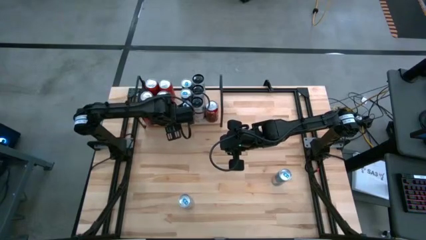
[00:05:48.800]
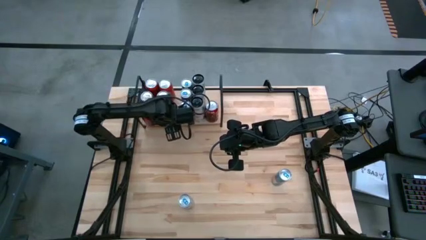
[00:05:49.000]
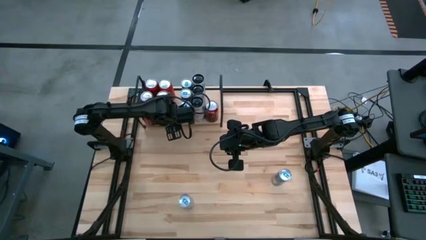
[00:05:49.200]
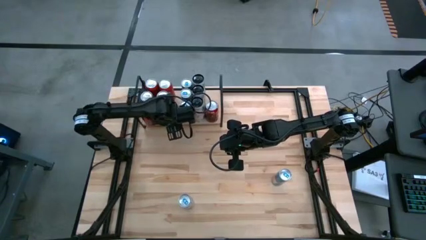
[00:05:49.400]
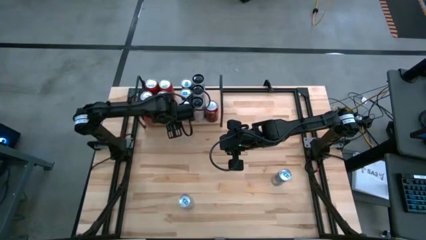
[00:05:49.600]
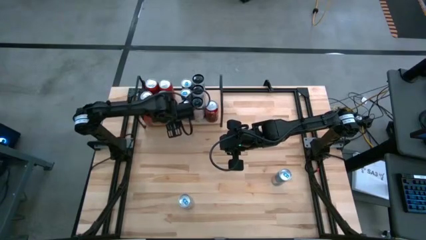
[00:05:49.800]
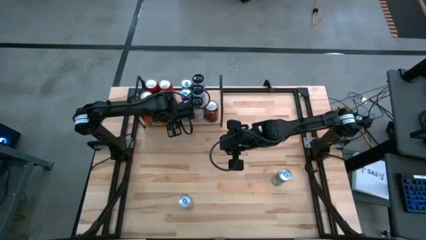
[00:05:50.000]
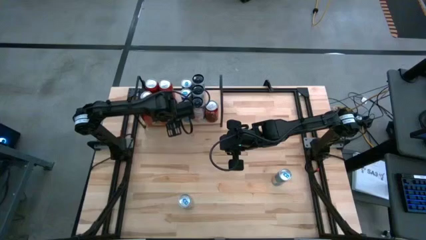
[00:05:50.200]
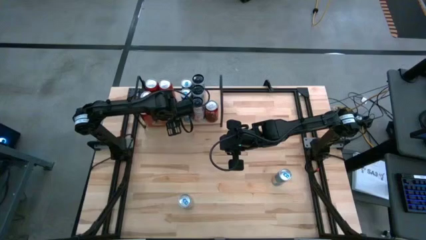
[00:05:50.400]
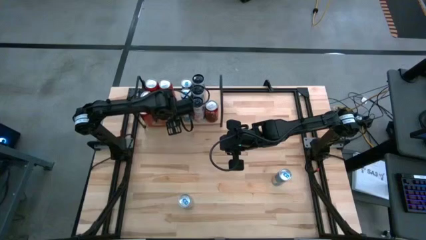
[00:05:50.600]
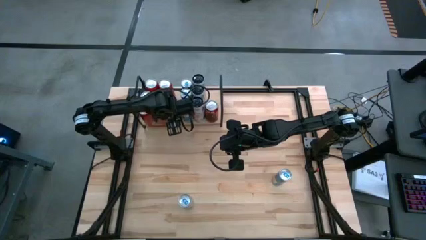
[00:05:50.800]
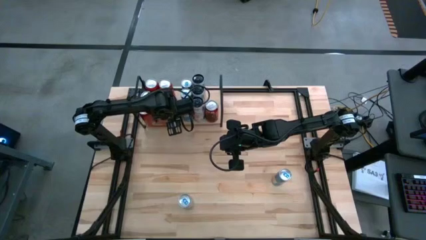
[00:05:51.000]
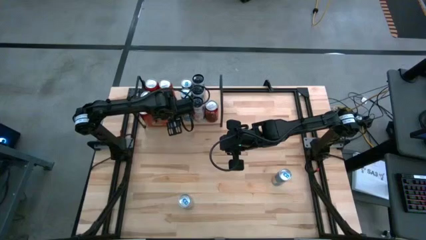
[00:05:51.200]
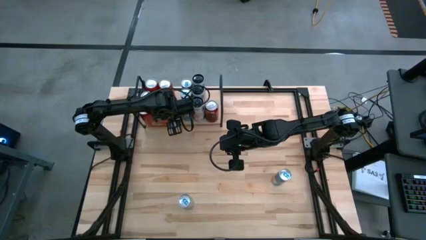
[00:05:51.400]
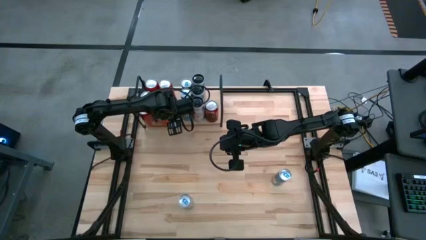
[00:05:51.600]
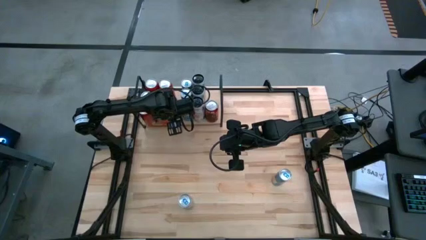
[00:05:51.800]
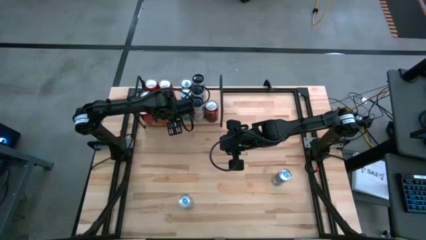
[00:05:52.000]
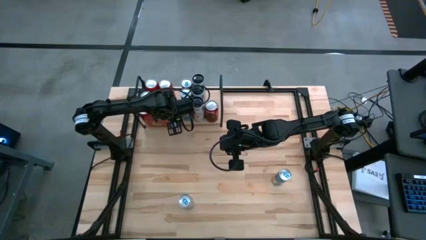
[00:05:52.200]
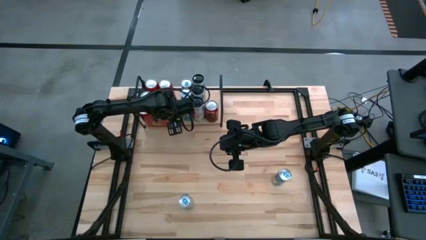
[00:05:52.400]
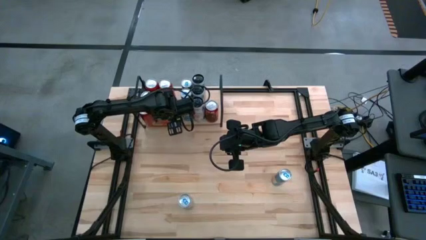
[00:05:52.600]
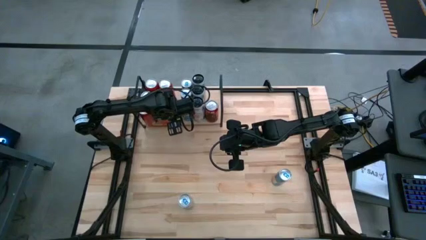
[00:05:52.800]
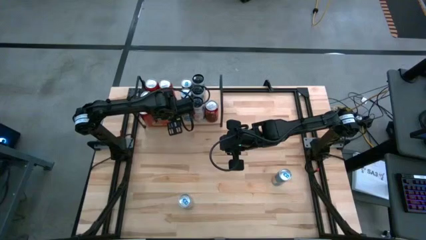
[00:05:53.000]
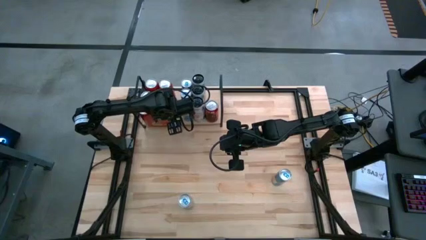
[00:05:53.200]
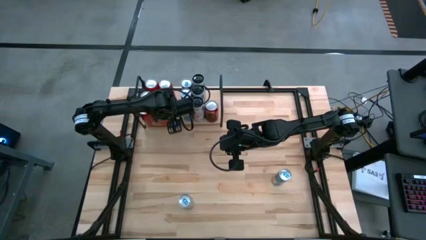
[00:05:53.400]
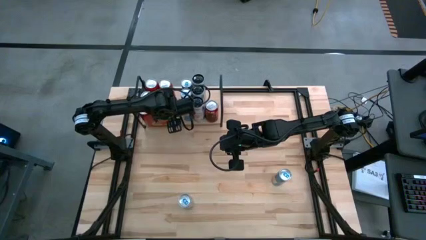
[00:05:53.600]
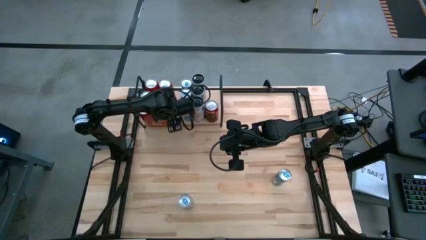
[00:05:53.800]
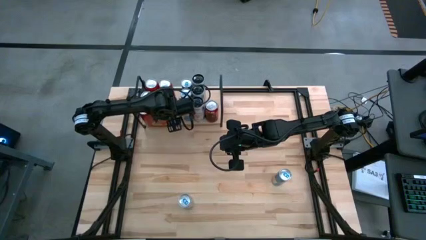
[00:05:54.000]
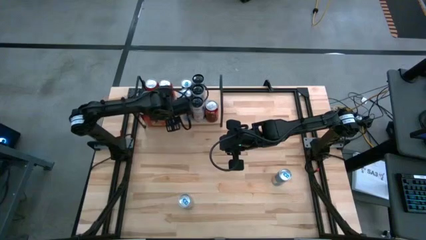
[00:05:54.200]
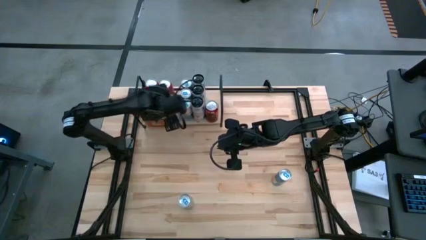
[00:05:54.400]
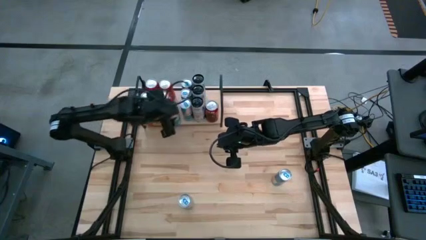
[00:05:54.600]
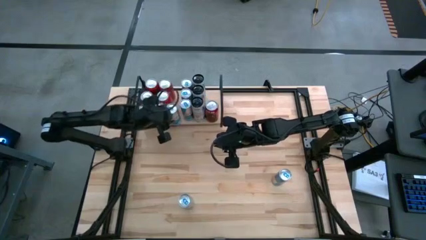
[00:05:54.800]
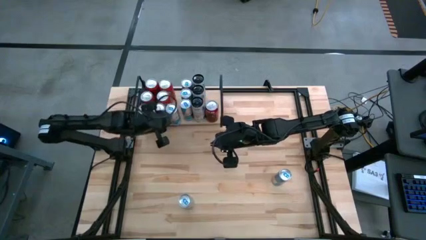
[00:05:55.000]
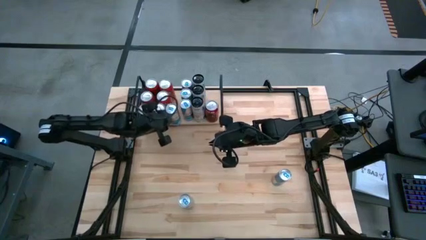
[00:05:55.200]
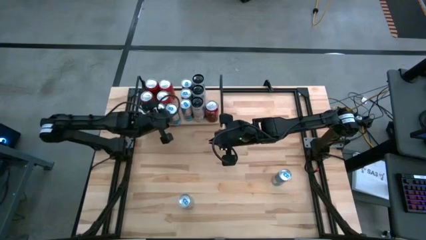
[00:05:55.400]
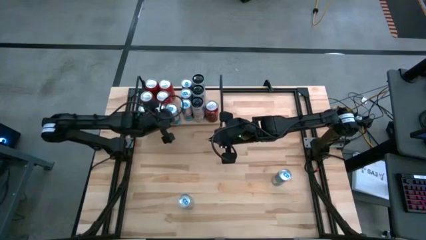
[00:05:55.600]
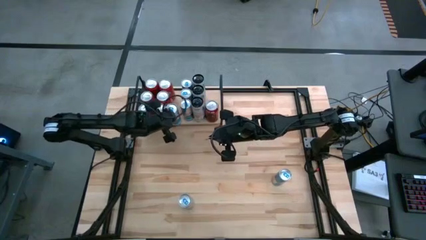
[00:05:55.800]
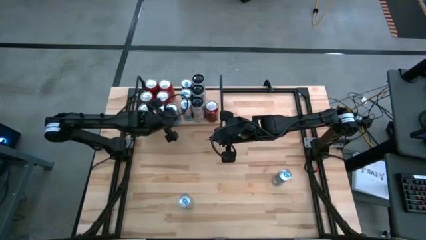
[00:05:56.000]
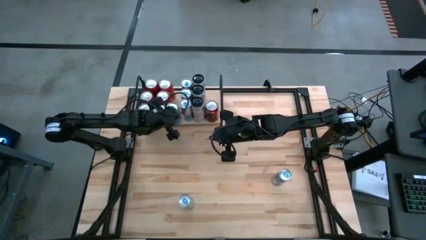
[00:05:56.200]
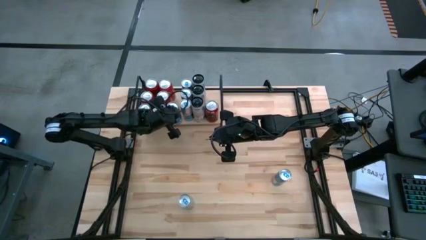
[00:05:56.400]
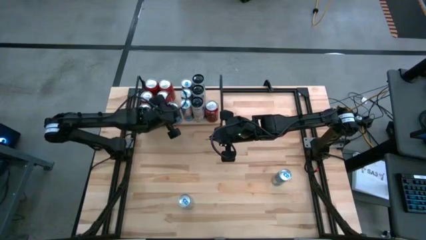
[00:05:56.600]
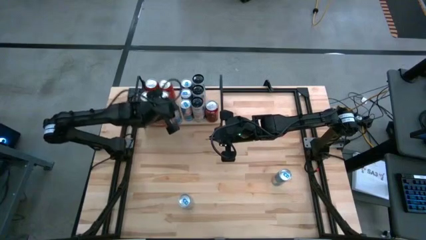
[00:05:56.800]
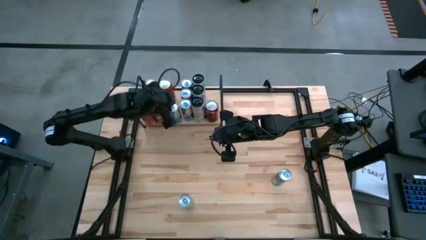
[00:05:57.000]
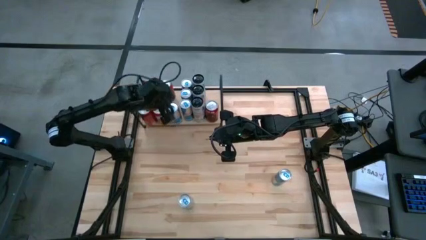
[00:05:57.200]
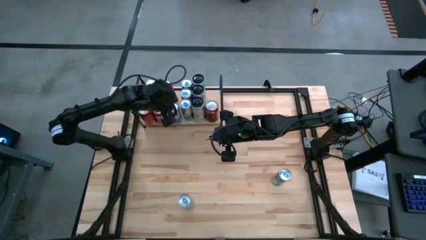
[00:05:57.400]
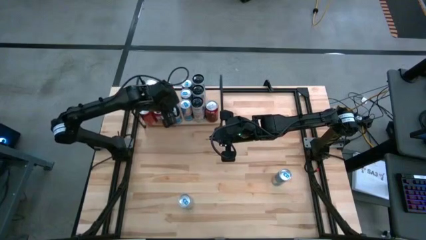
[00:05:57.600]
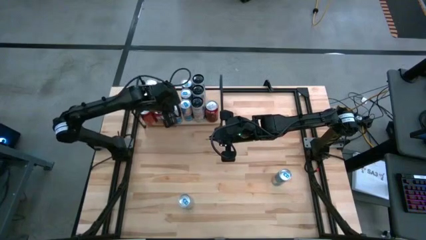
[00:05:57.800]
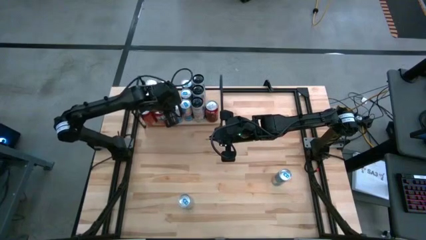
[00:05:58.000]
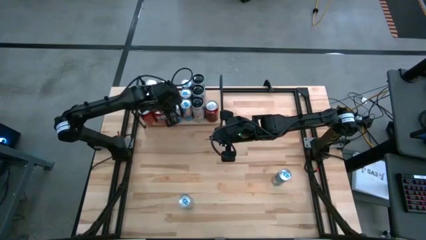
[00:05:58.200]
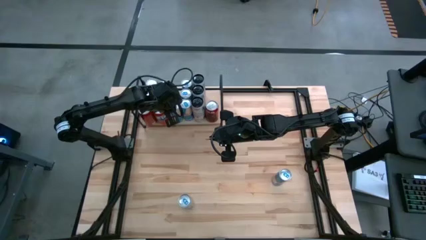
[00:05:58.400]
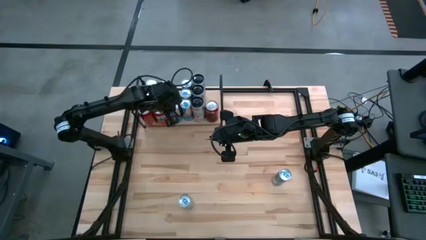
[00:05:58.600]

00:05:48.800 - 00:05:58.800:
Task: Place canned beverage on shelf
Put the blue soda can on the shelf beside the other aligned blue soda cans

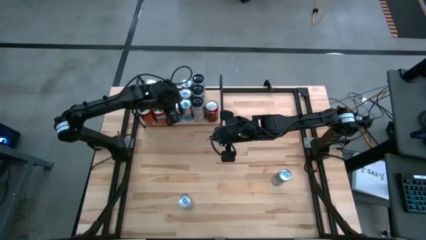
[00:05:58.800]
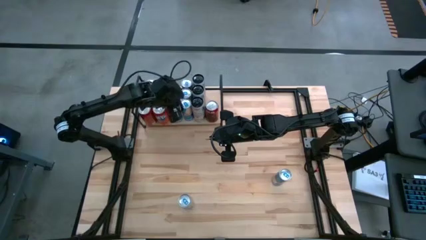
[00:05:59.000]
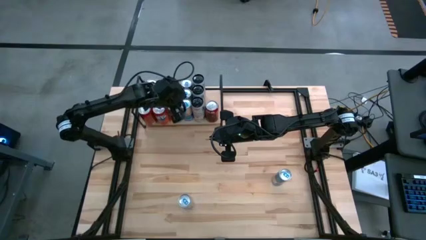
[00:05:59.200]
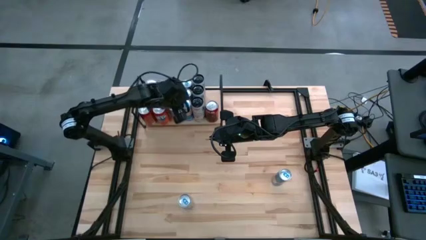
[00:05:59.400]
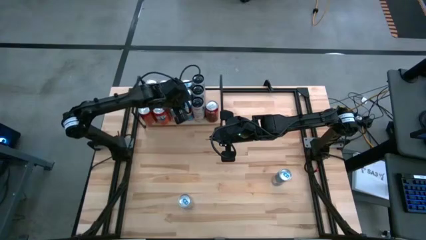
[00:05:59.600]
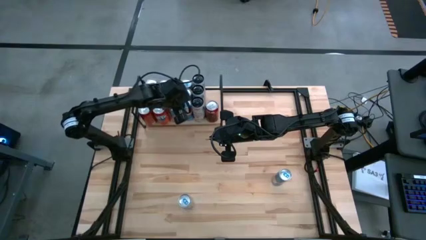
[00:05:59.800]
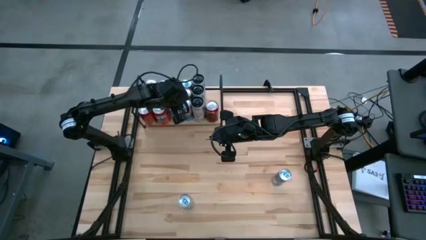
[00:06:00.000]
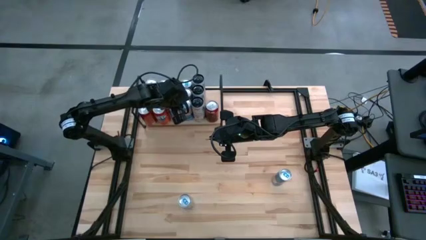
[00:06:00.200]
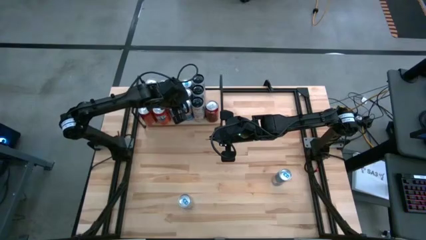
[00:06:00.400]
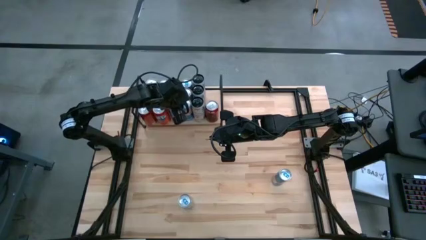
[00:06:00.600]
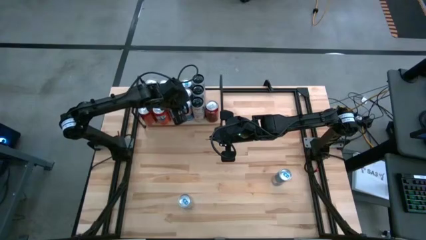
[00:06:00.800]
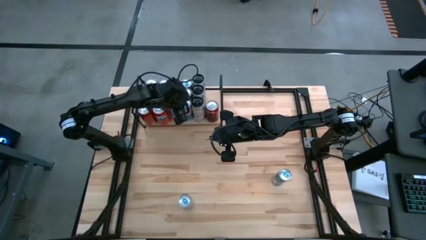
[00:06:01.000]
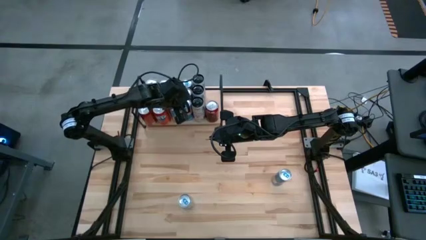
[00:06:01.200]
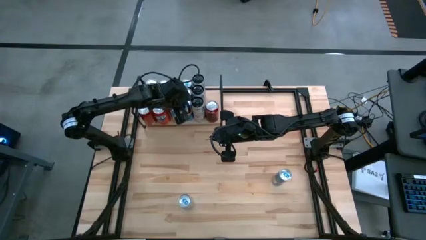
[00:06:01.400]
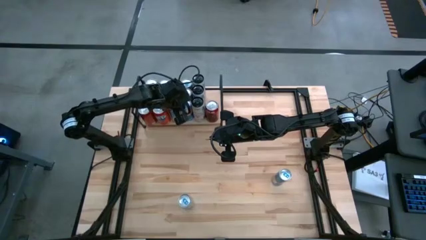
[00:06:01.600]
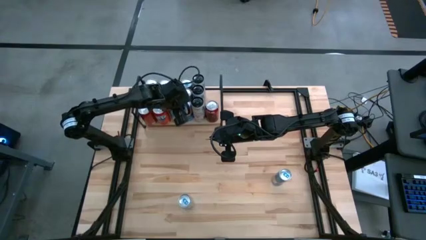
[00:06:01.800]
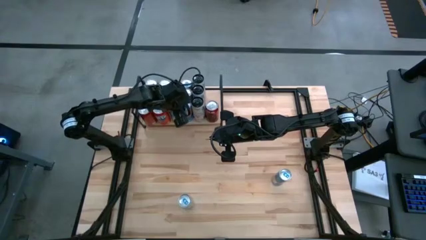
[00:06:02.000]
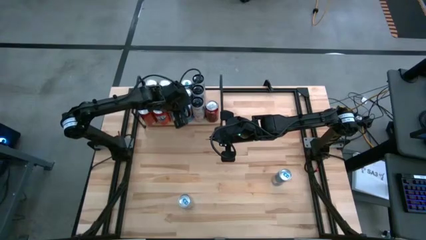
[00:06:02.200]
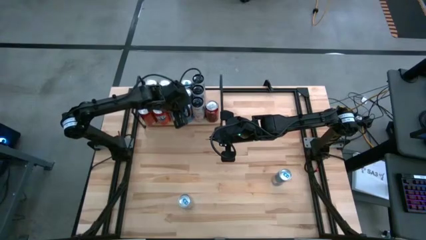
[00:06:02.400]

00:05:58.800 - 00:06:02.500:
Adjust the blue can on the shelf
